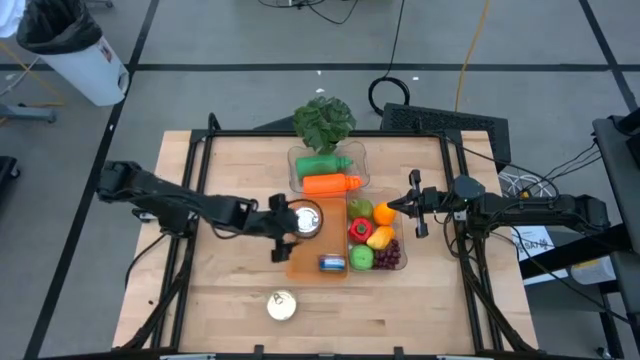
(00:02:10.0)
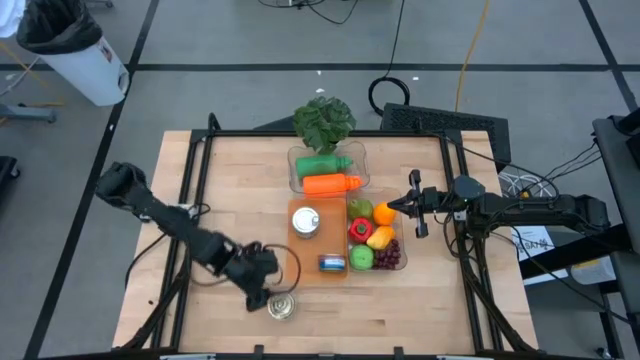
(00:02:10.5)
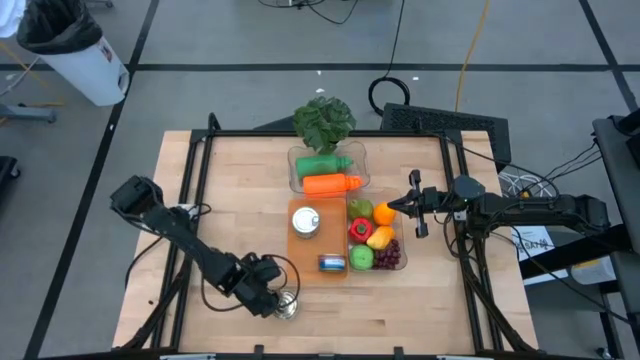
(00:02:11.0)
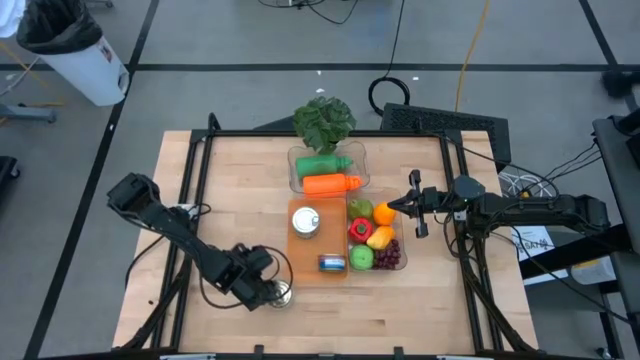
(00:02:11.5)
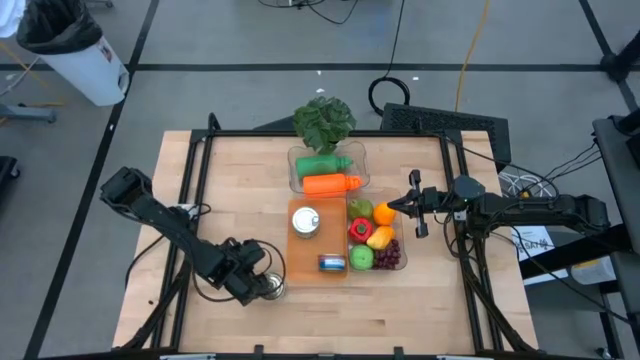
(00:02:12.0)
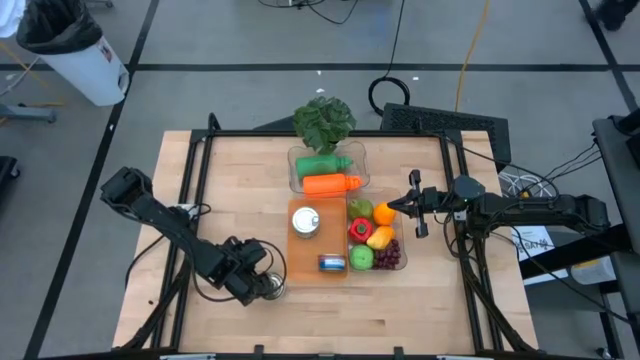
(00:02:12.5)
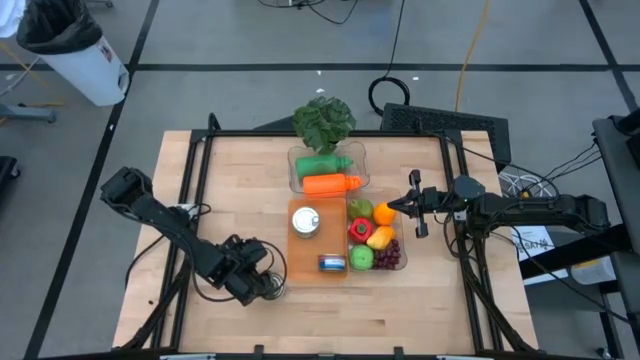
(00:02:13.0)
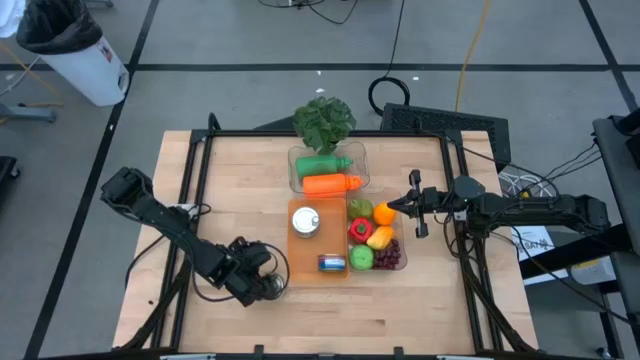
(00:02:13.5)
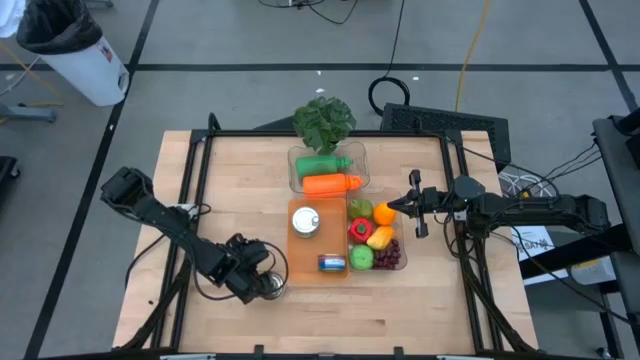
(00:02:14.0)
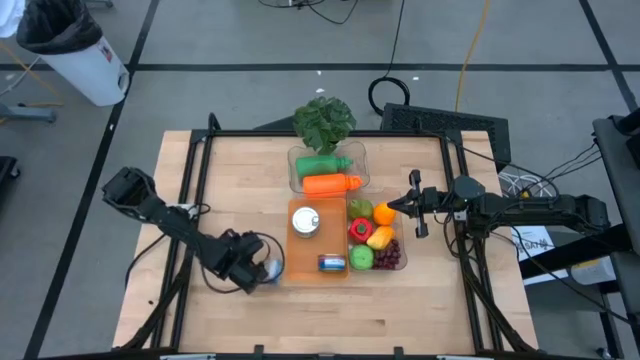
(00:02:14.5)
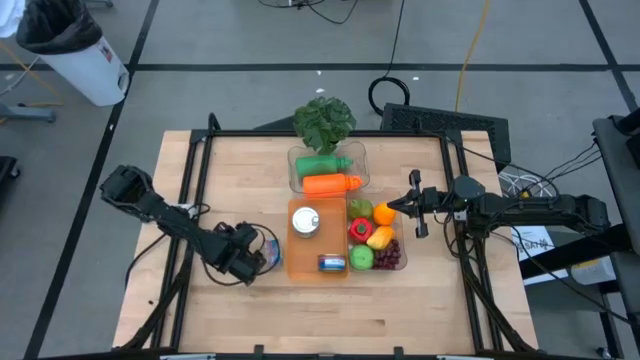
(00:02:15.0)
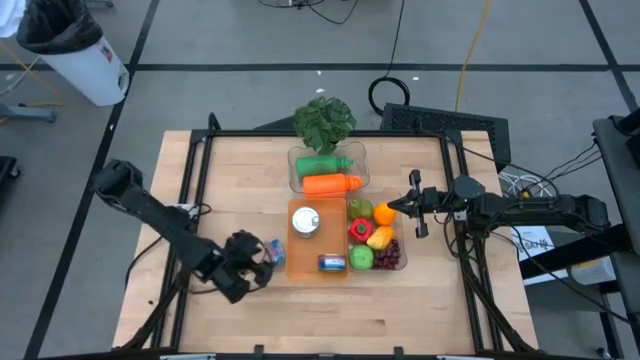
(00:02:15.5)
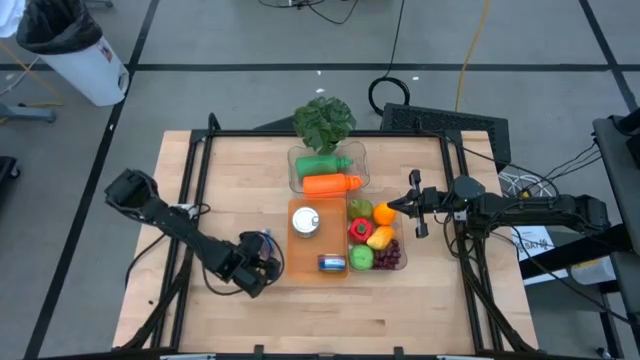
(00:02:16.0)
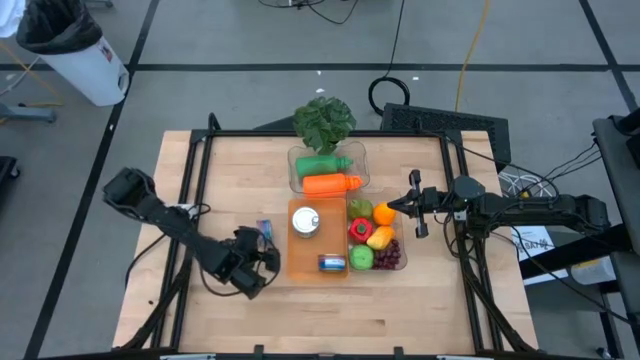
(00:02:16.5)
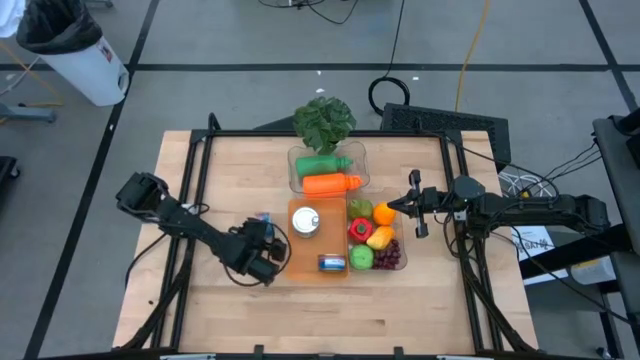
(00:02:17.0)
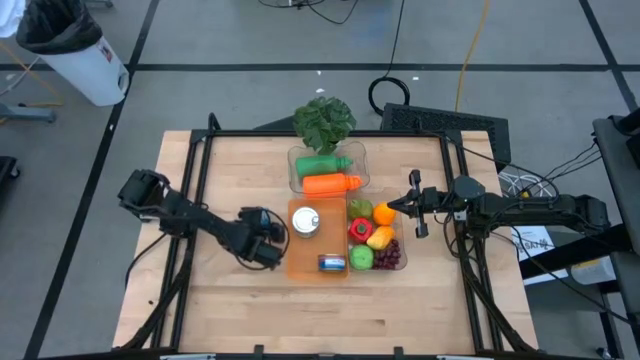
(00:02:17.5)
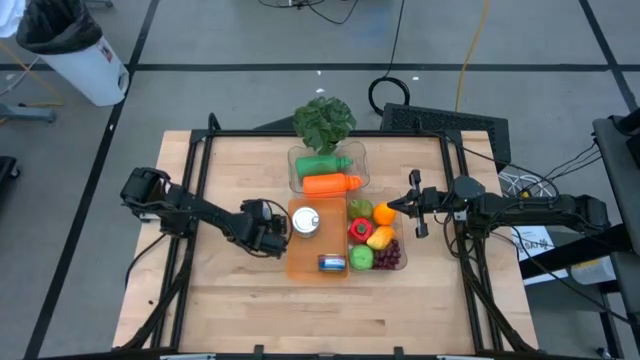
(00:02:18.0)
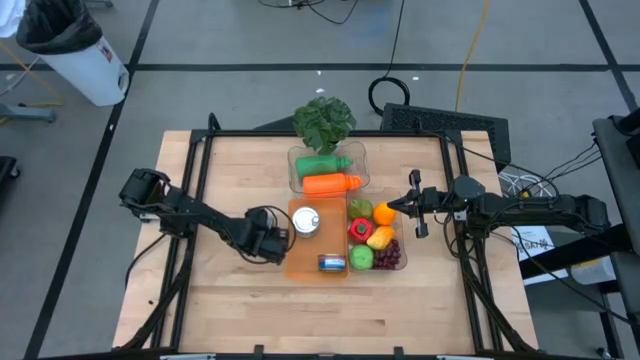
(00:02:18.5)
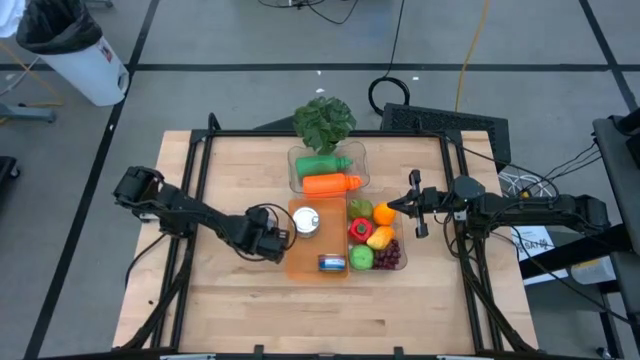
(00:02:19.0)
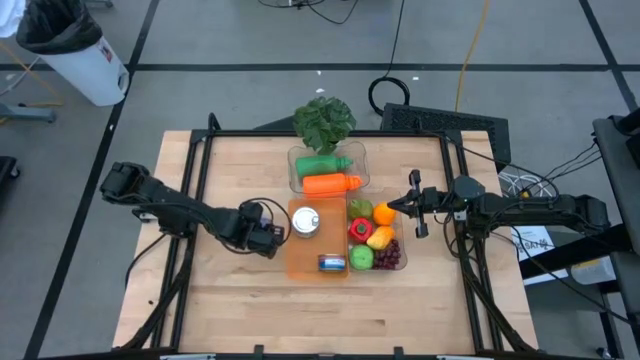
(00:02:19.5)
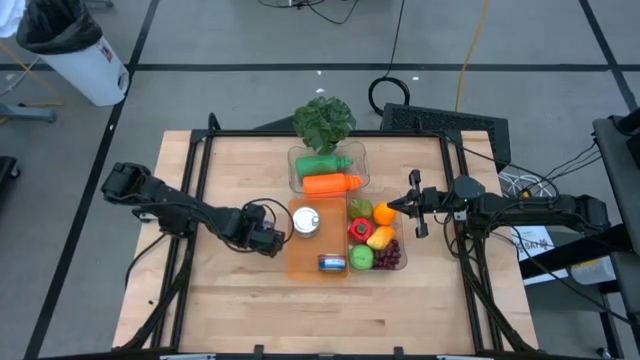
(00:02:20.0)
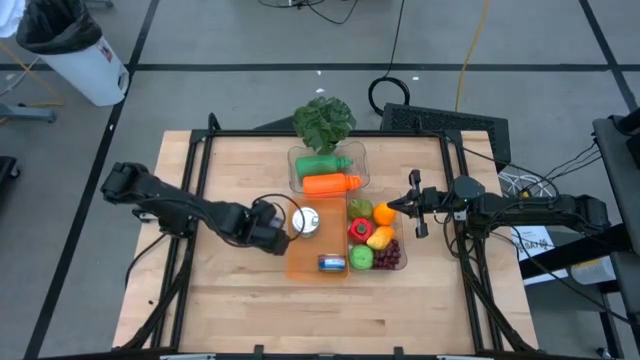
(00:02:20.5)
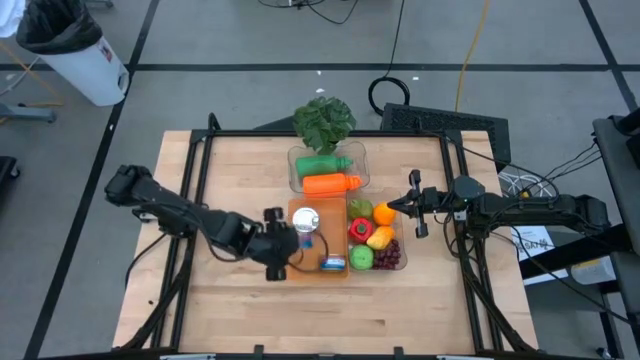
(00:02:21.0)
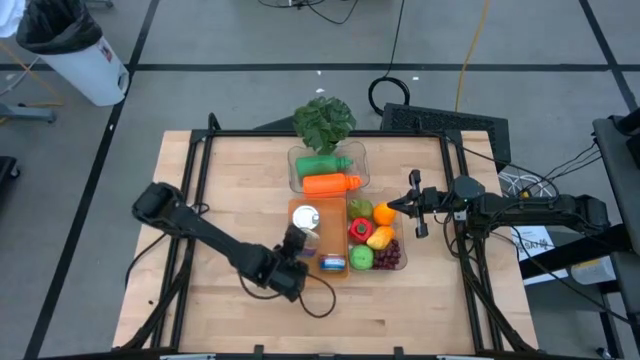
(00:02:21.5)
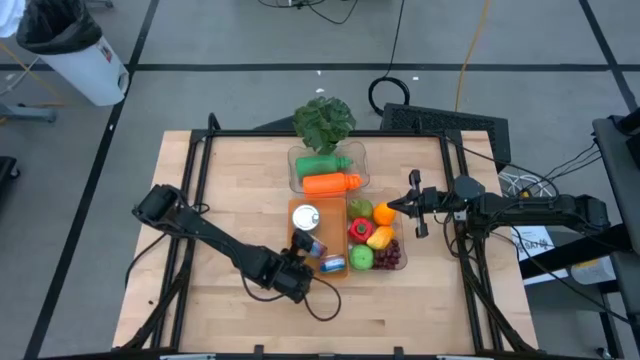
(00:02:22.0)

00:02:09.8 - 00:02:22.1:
Task: Pick & Place Food Item
Put the blue pink tuna can into the orange bin

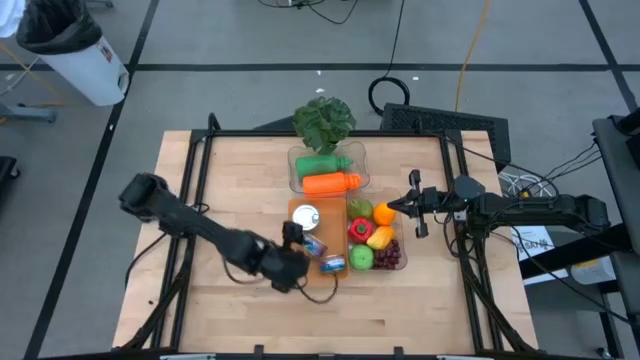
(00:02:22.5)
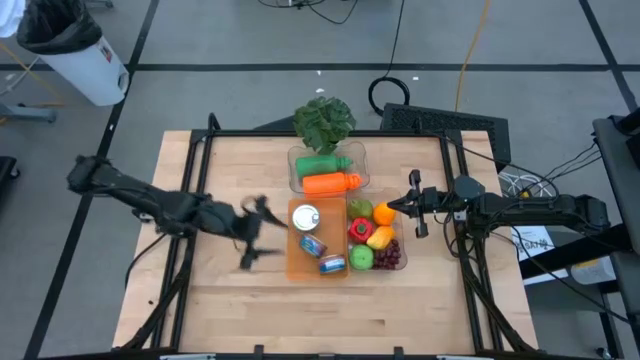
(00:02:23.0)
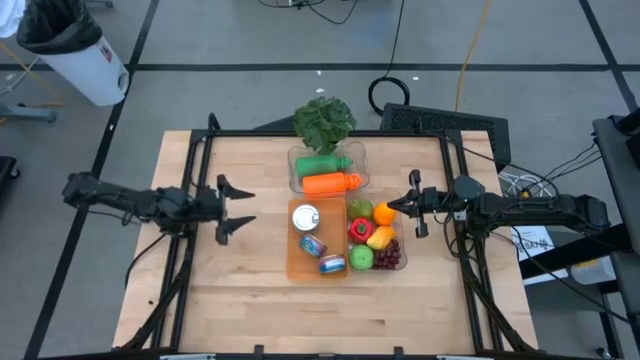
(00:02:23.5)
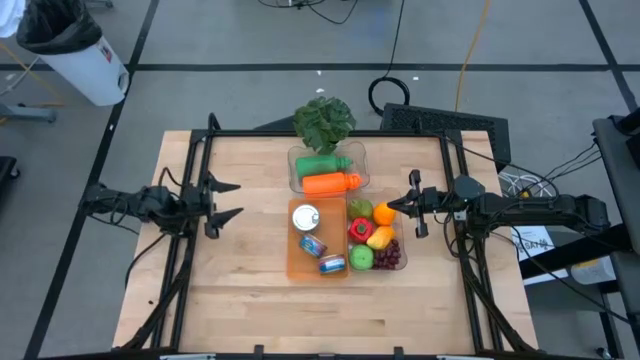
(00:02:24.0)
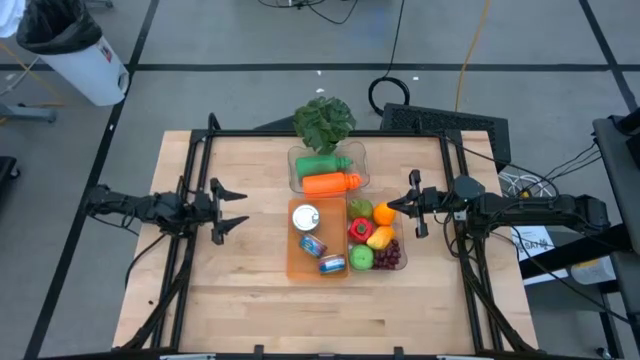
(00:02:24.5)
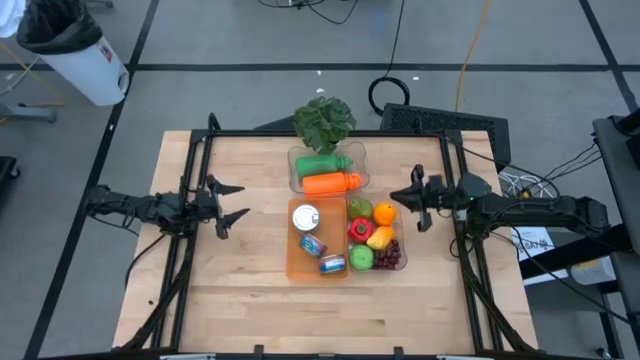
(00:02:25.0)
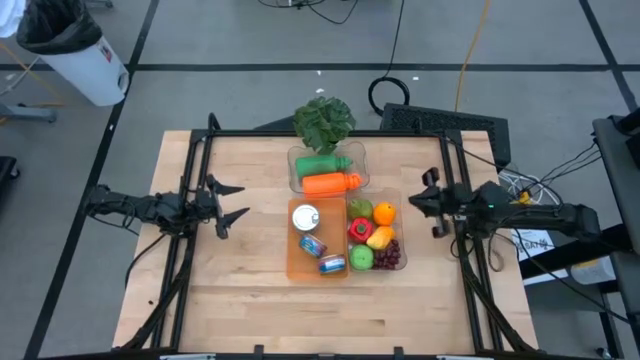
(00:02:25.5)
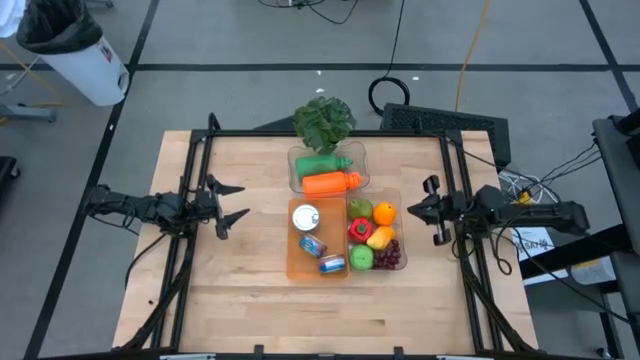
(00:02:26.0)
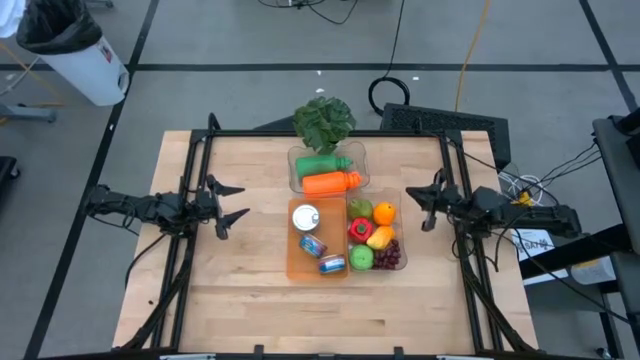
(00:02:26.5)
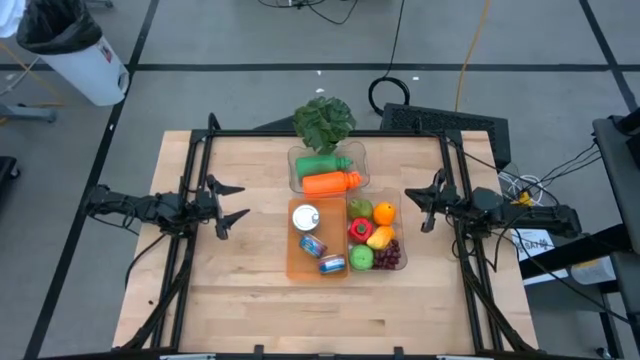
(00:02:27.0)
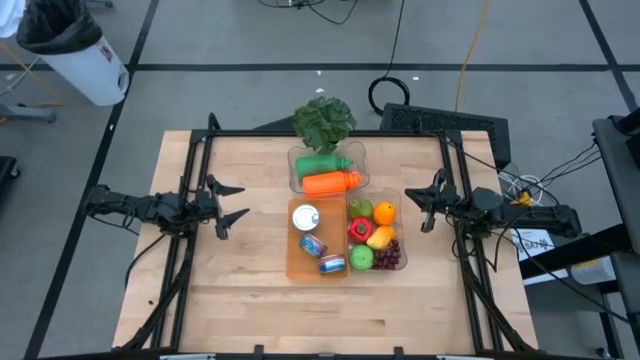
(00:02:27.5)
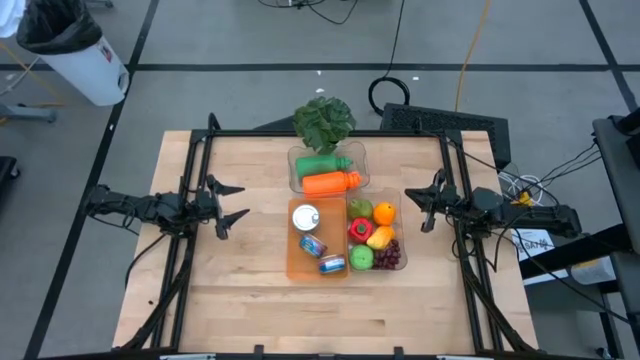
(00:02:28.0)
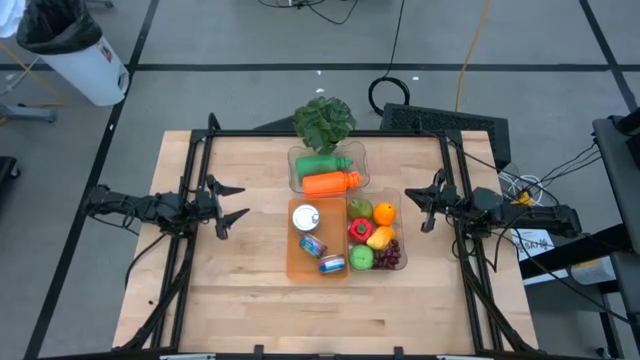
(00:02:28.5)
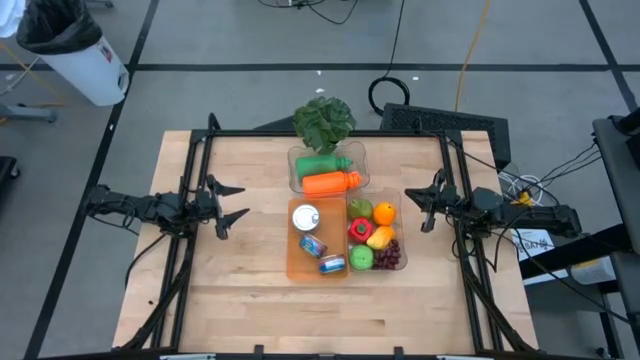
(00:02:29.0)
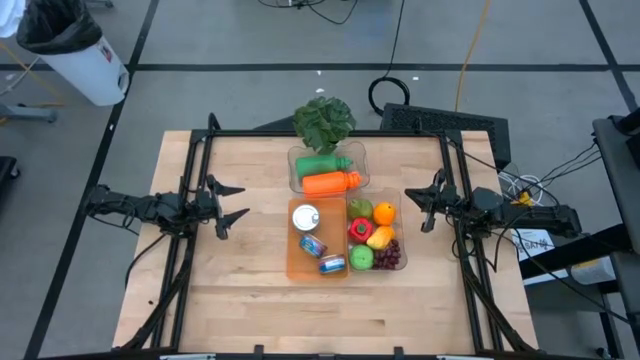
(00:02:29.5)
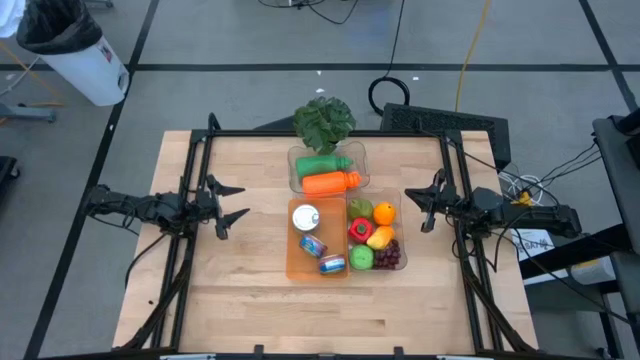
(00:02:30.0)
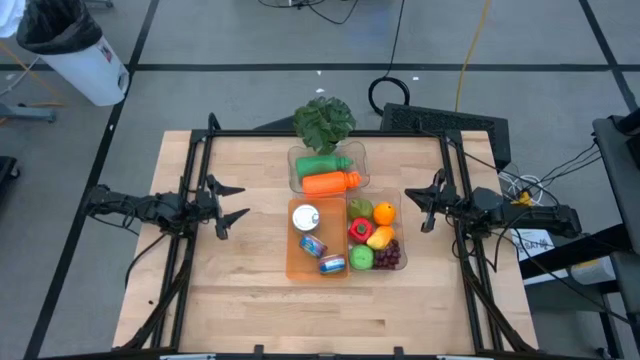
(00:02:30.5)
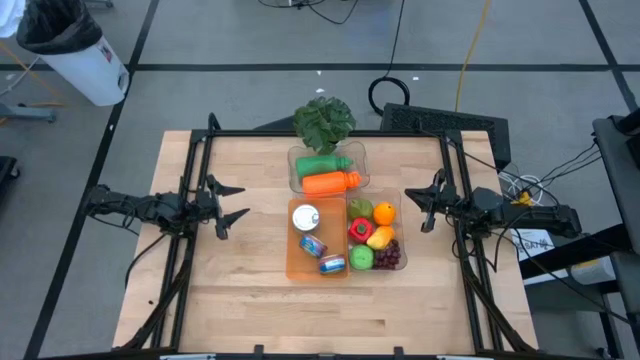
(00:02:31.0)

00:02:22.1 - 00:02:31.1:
Return to Home Position
